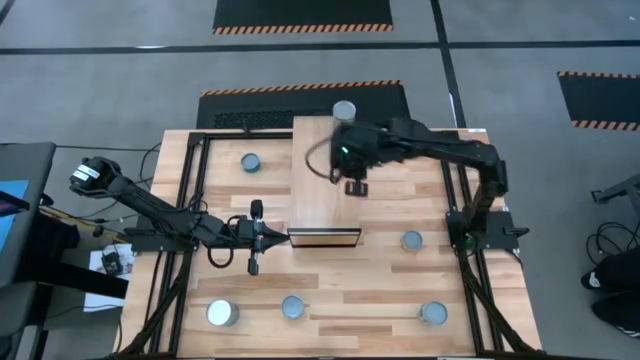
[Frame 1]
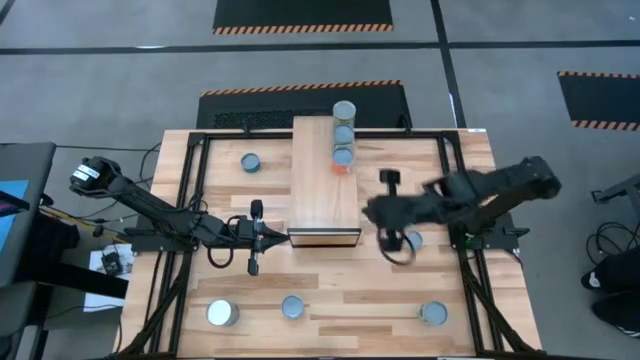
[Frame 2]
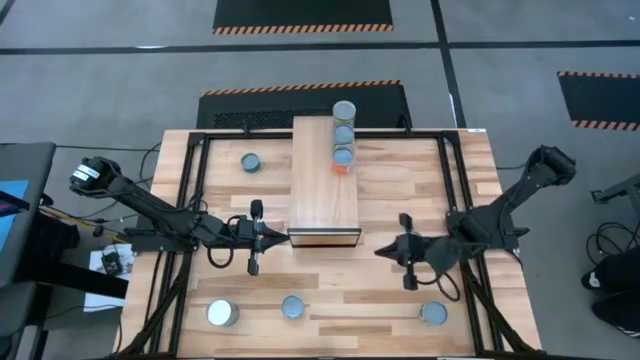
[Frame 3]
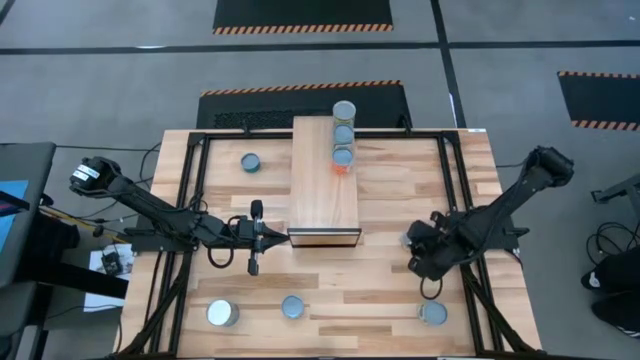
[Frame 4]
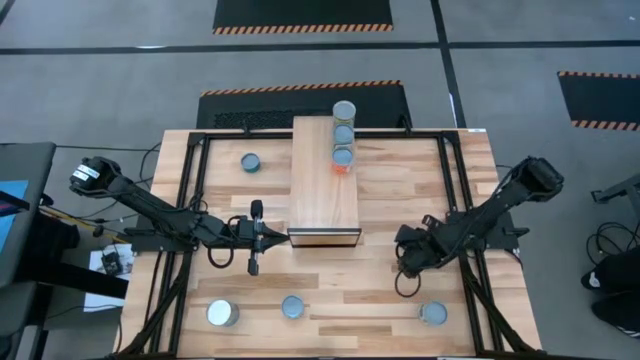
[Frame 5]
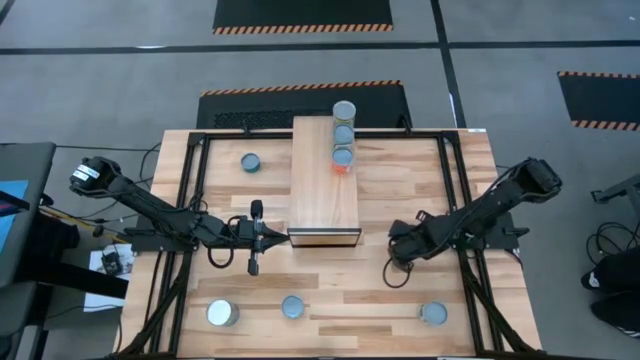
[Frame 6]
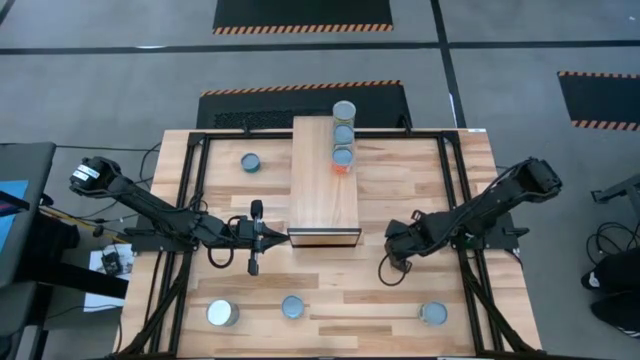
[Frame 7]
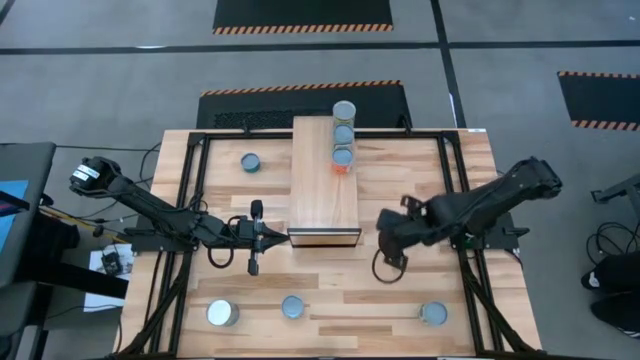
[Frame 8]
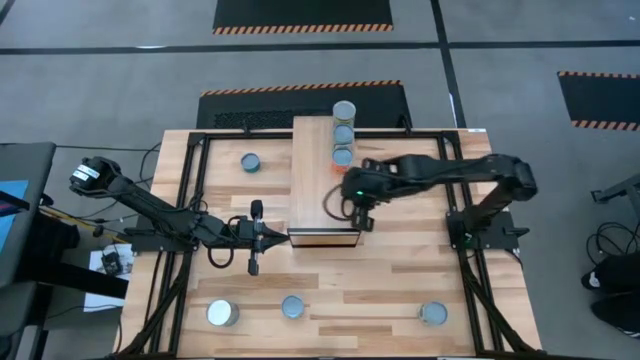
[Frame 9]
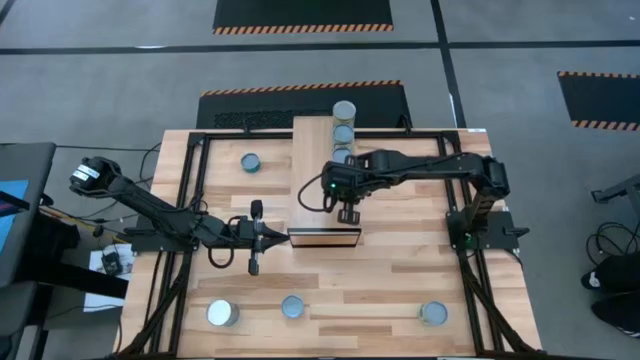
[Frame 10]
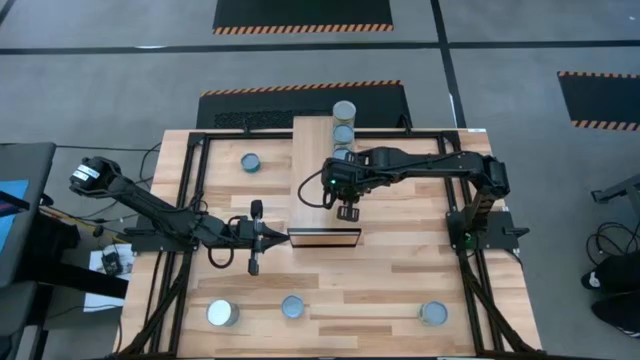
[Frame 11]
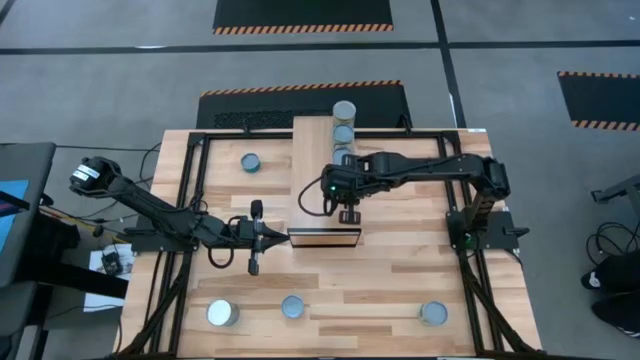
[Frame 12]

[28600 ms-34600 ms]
Task: Pick and place cans onto a shelf
Put the canned cherries on the shelf

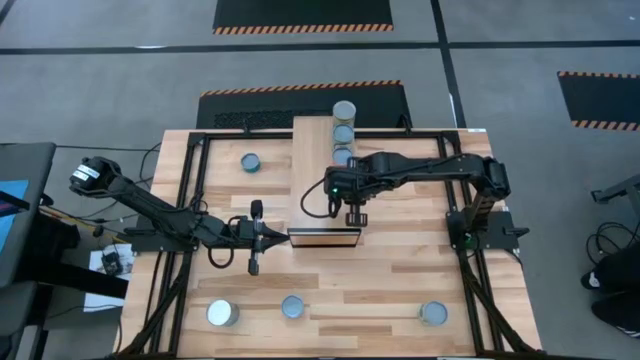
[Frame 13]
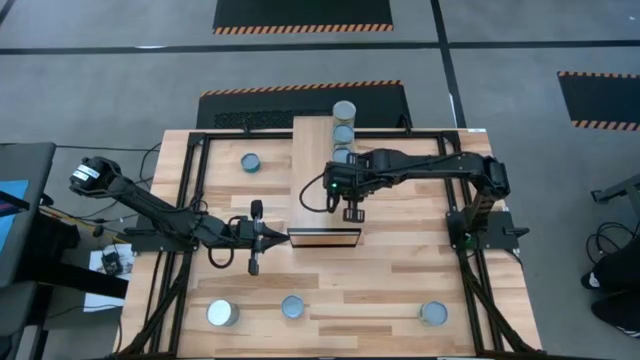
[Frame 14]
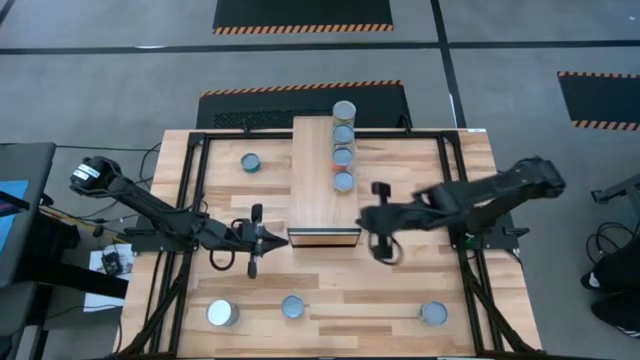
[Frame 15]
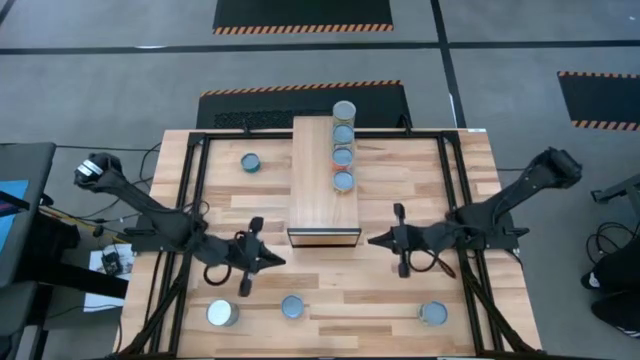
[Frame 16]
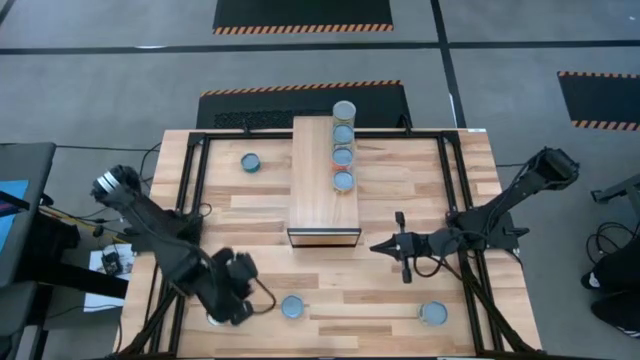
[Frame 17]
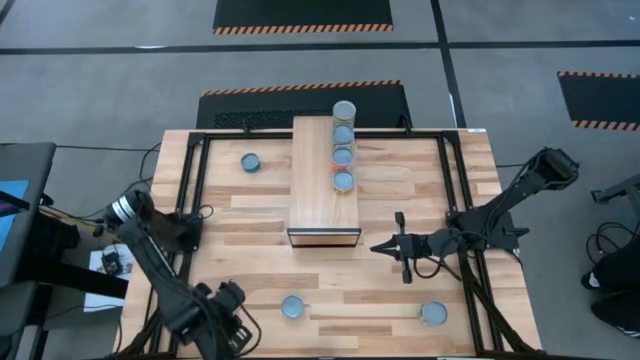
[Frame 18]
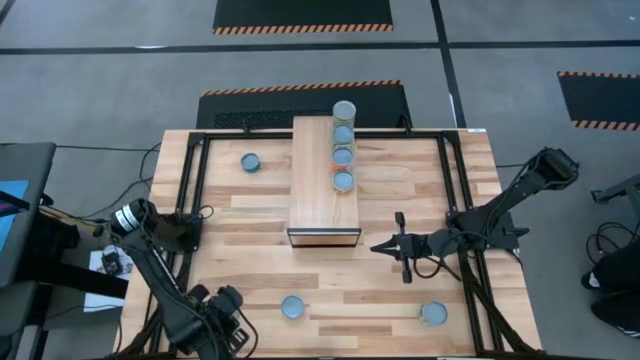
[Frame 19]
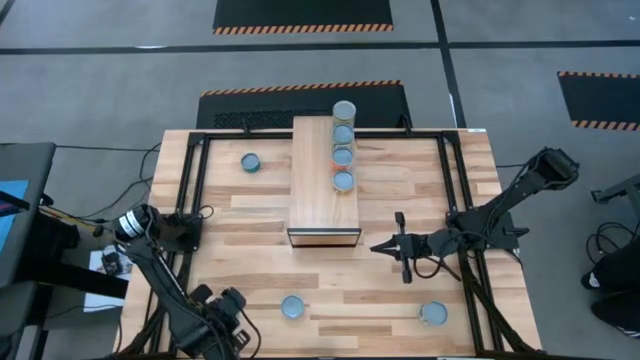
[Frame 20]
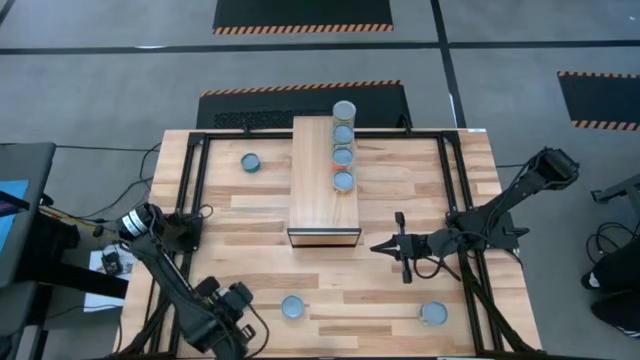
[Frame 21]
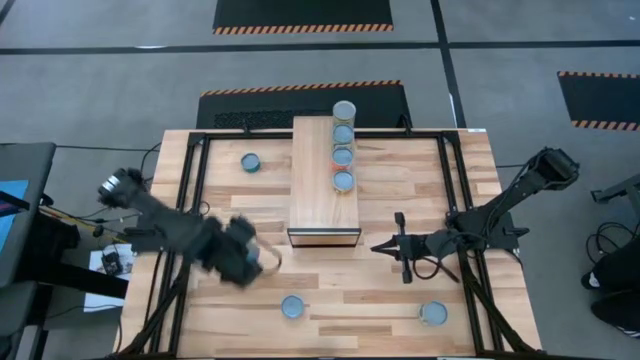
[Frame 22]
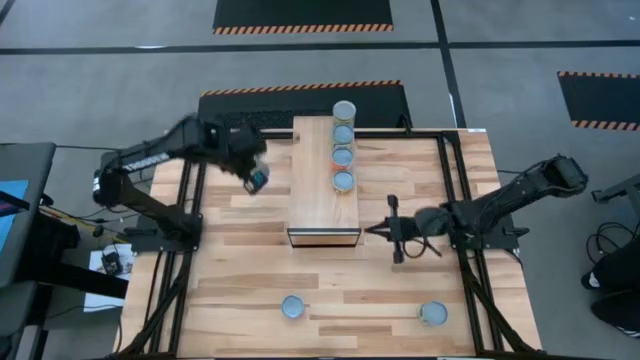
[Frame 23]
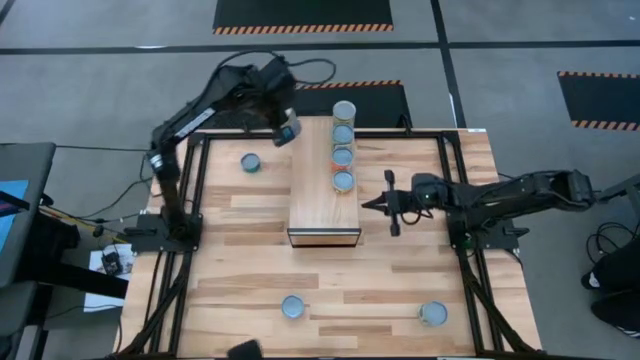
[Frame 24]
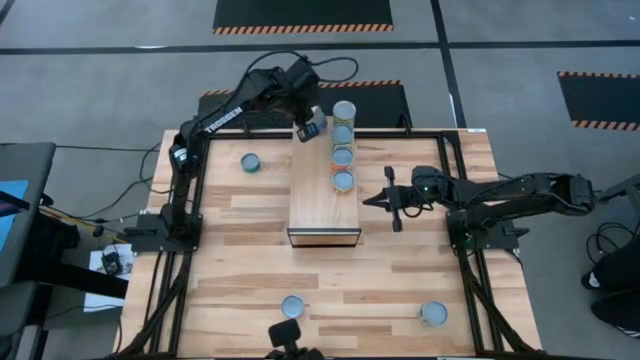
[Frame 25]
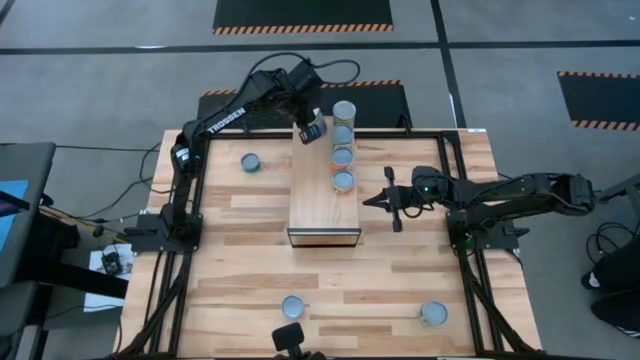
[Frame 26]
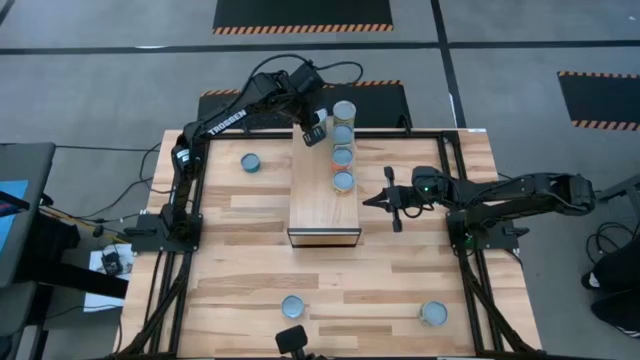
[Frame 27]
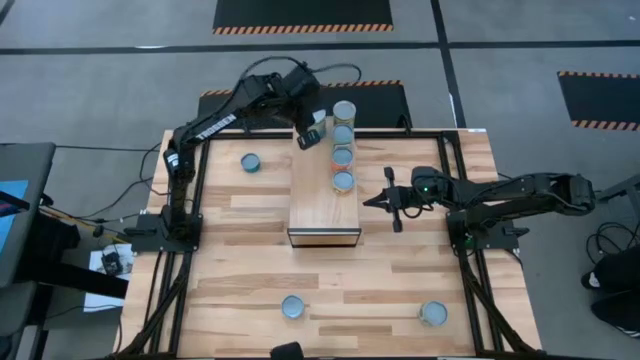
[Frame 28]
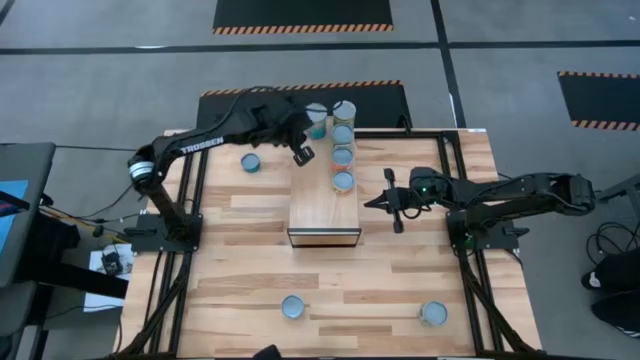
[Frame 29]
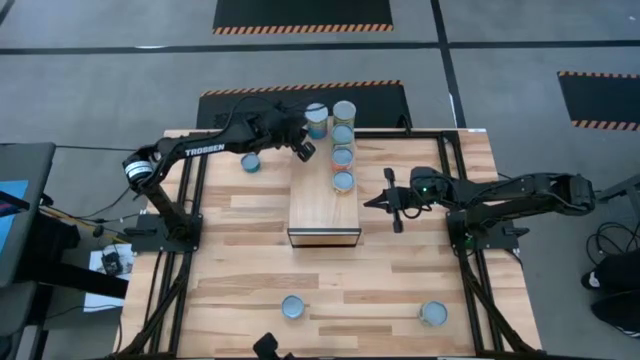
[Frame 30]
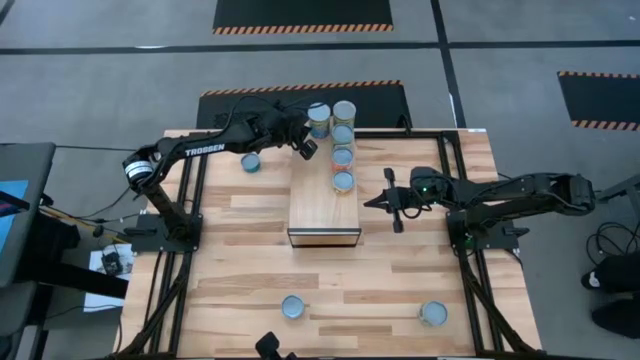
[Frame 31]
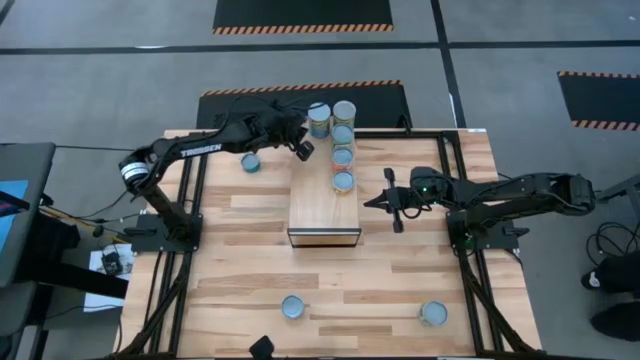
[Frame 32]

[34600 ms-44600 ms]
Put the canned cherries on the shelf

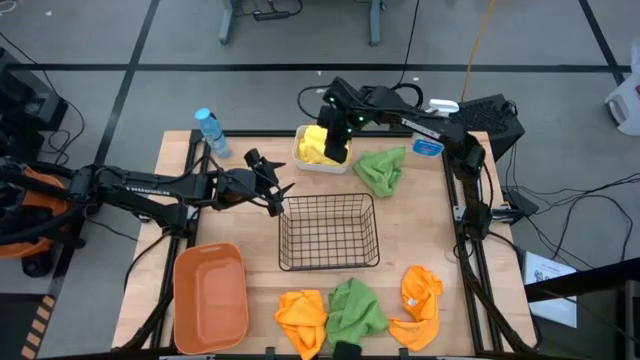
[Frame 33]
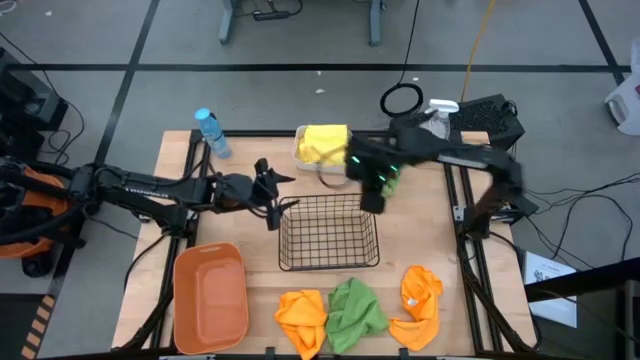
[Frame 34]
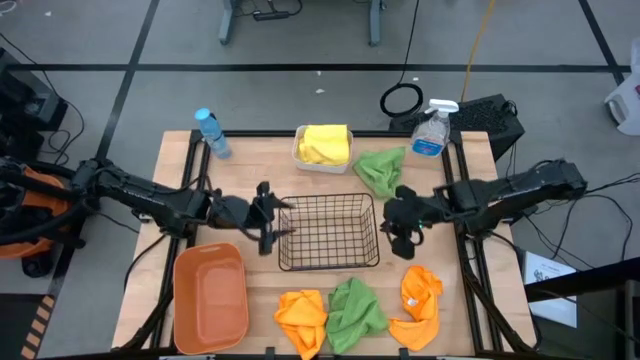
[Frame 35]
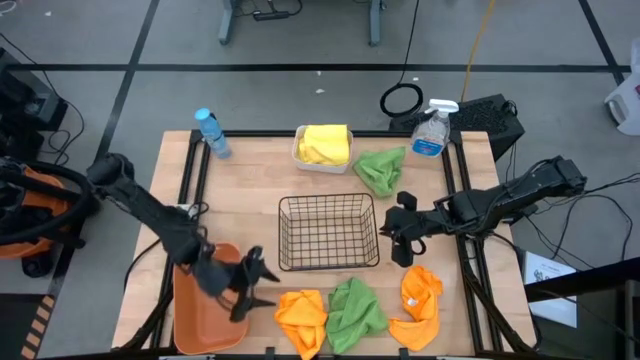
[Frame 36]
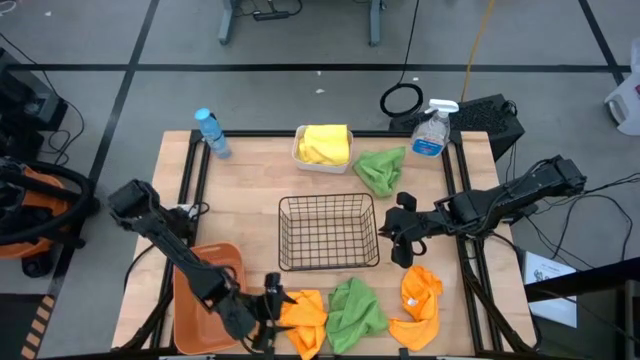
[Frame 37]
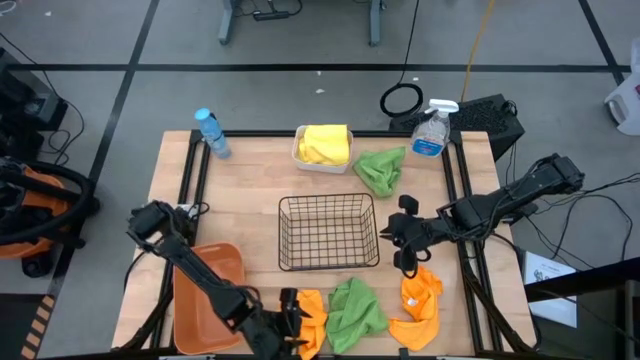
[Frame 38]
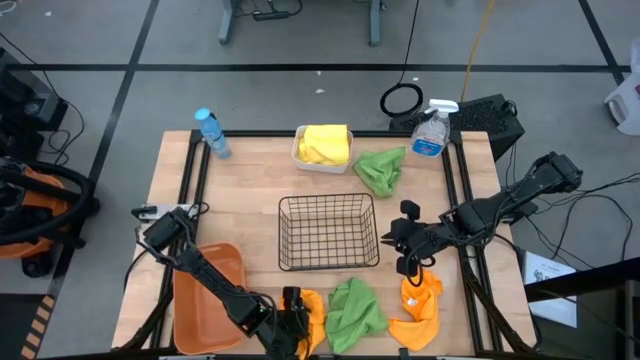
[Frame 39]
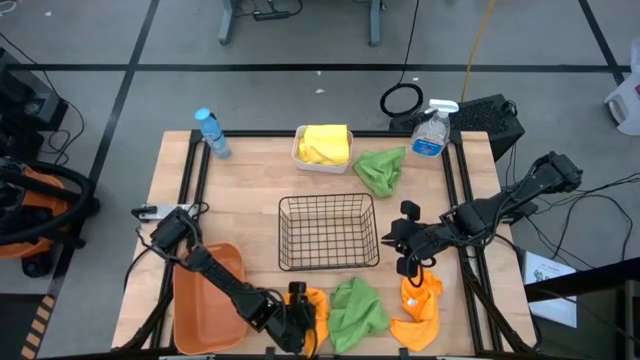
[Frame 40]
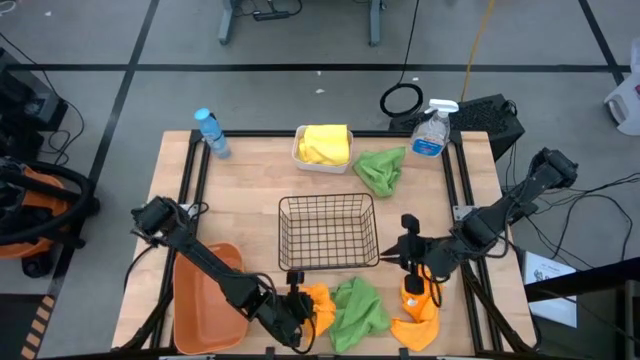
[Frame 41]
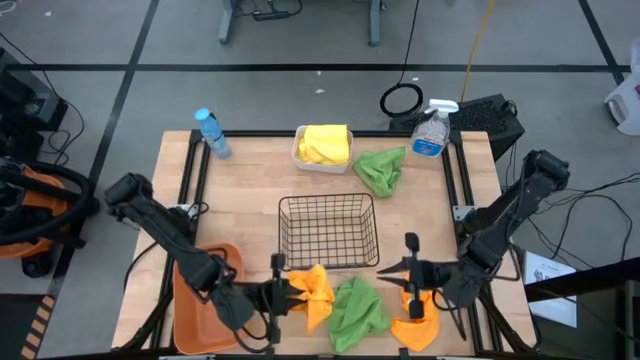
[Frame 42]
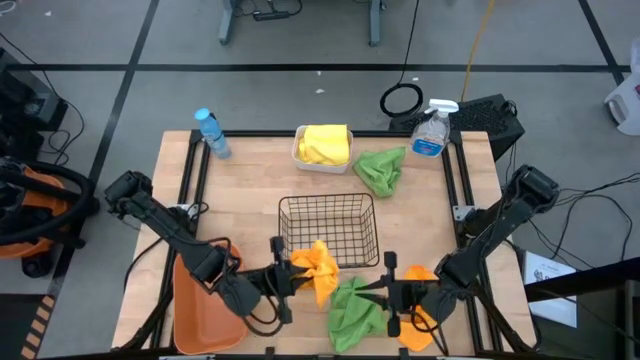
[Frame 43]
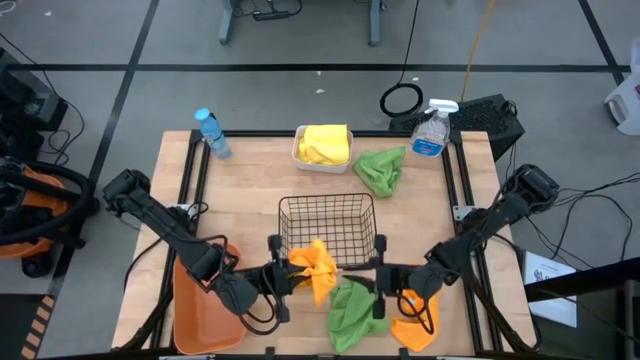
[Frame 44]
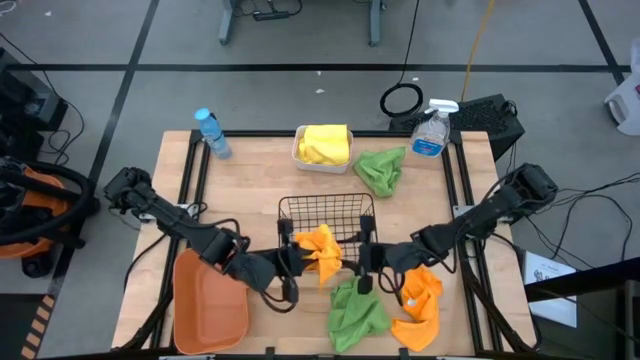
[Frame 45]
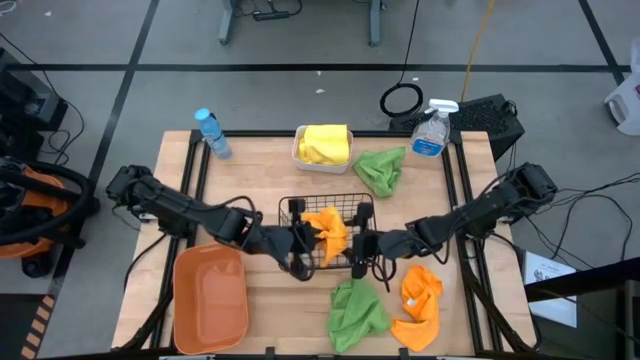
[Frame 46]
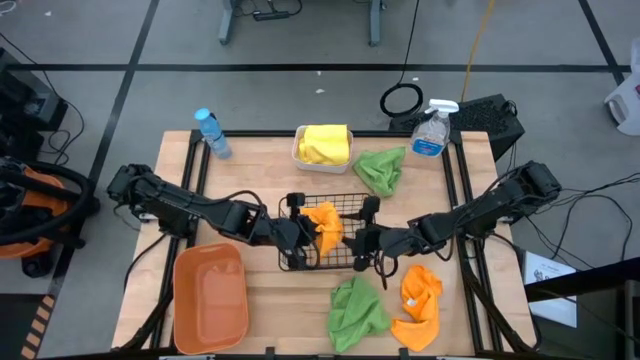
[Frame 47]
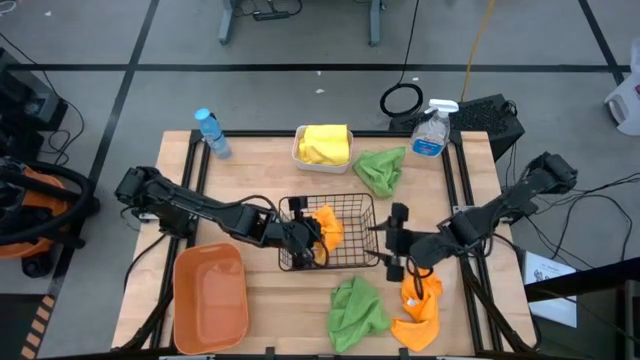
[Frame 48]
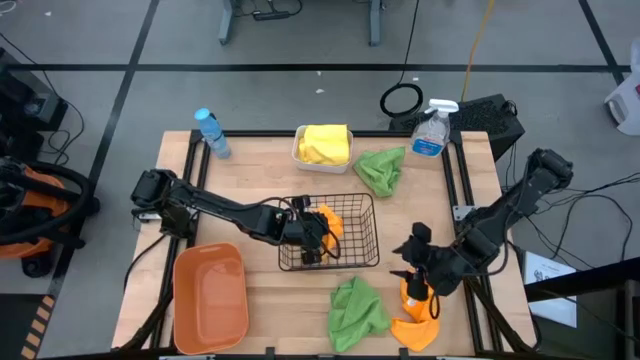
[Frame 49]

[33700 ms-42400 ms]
Task: Sort microfiber towel by color & place in baskets
Put the left orange microfiber cloth into the black wire basket
